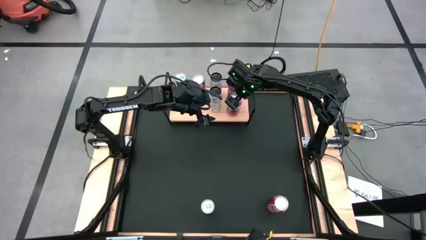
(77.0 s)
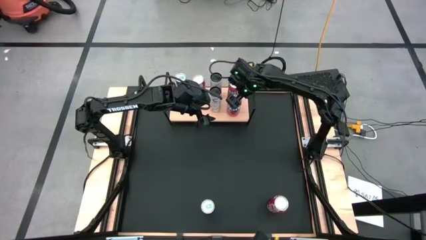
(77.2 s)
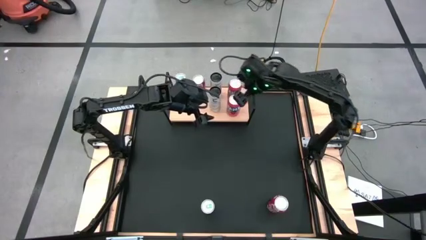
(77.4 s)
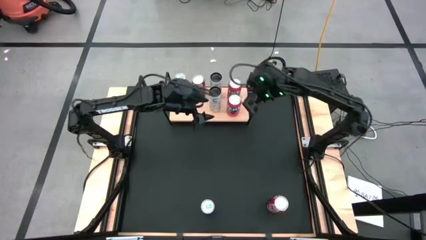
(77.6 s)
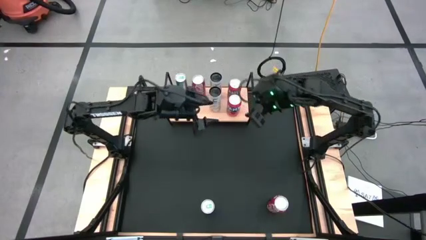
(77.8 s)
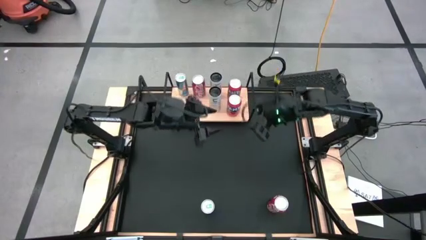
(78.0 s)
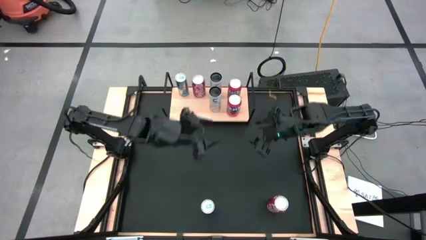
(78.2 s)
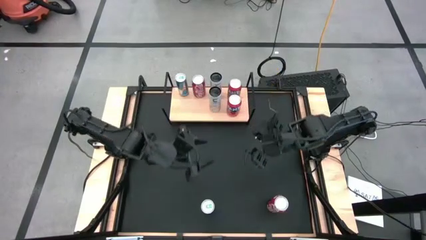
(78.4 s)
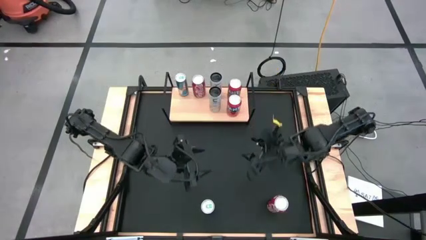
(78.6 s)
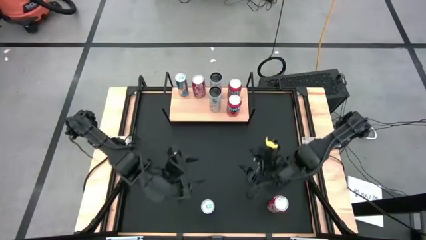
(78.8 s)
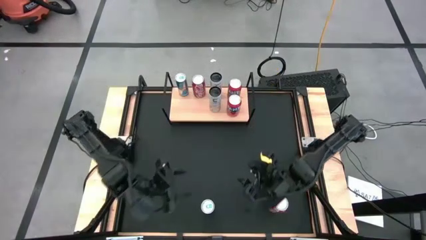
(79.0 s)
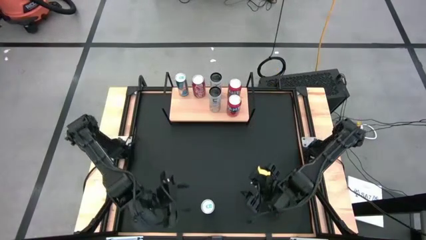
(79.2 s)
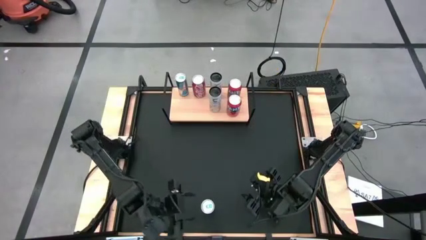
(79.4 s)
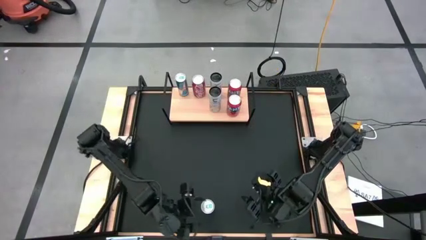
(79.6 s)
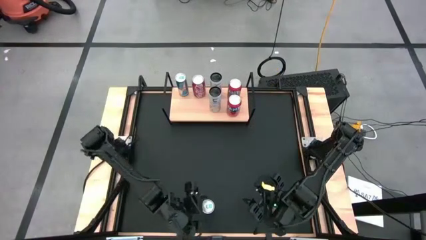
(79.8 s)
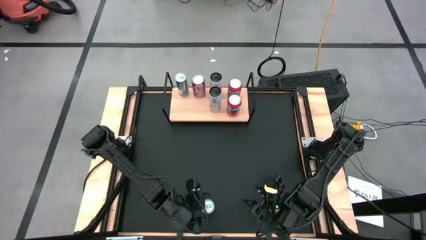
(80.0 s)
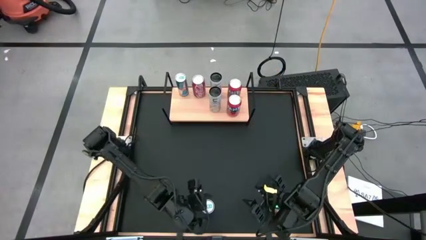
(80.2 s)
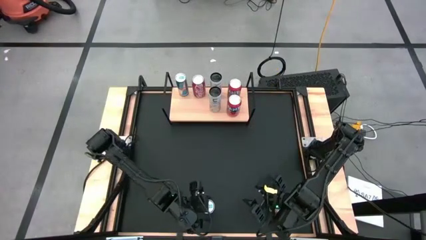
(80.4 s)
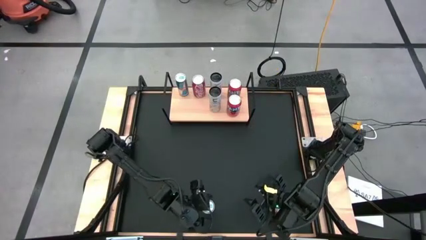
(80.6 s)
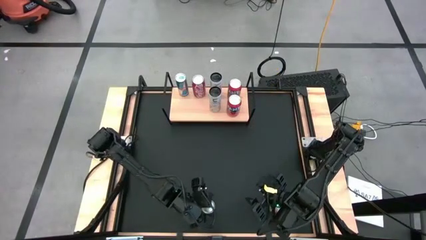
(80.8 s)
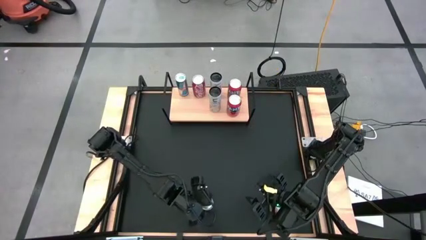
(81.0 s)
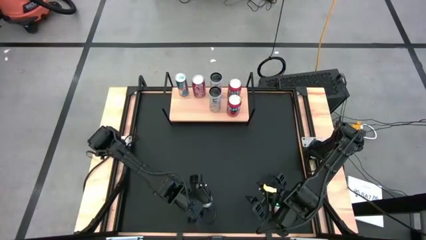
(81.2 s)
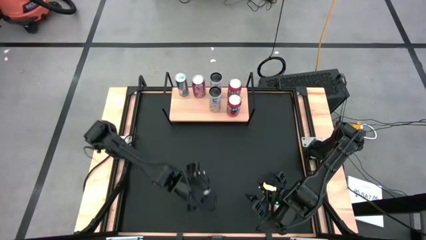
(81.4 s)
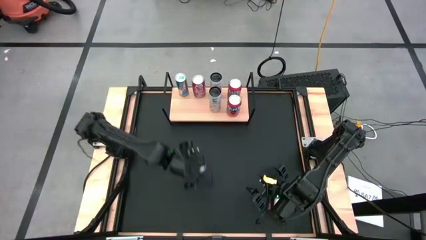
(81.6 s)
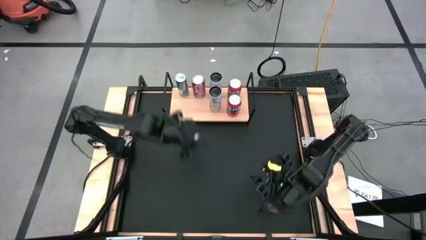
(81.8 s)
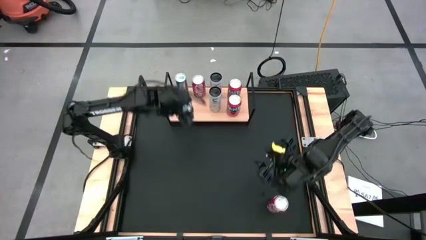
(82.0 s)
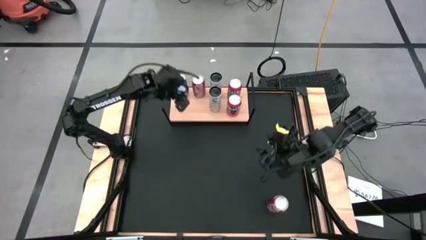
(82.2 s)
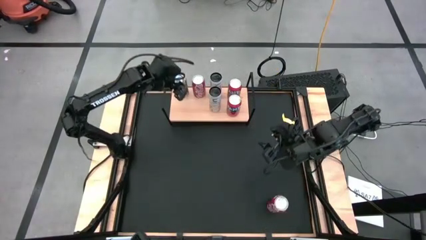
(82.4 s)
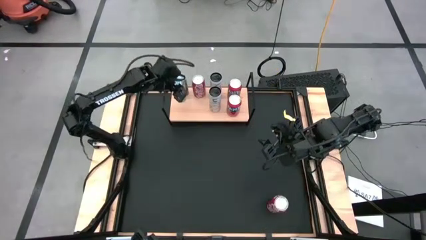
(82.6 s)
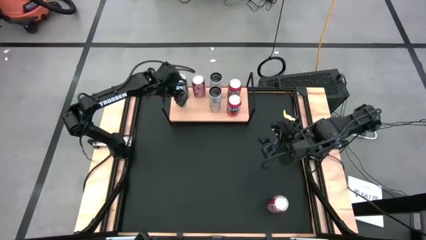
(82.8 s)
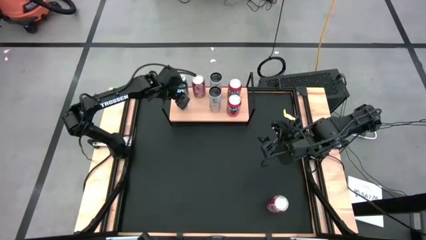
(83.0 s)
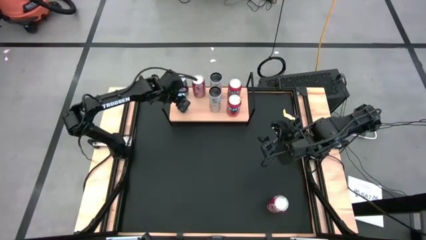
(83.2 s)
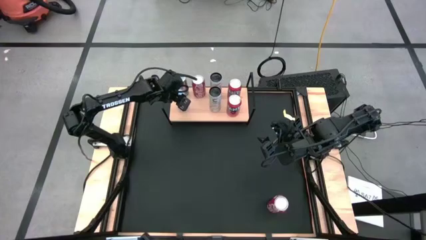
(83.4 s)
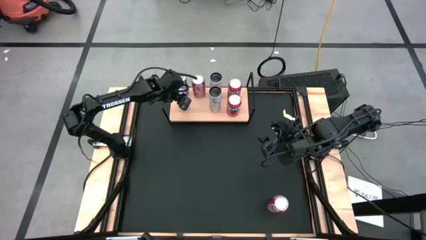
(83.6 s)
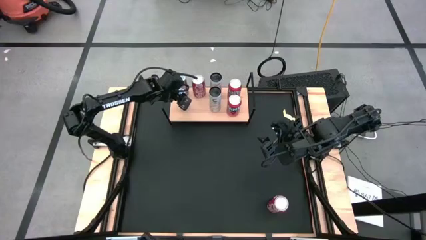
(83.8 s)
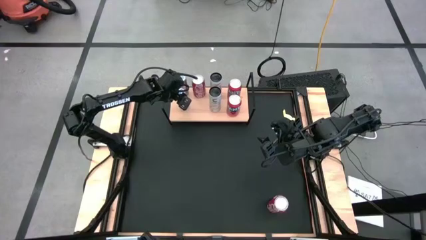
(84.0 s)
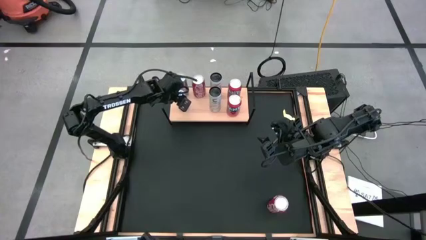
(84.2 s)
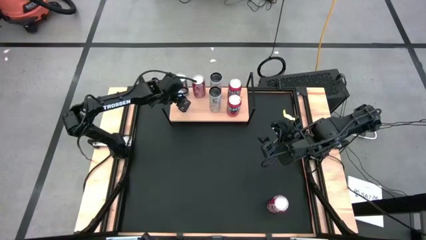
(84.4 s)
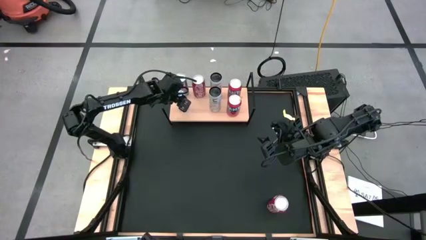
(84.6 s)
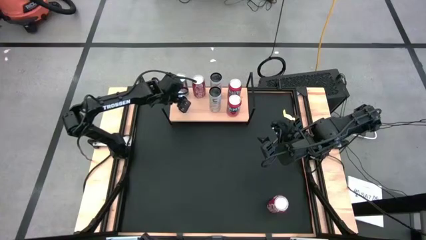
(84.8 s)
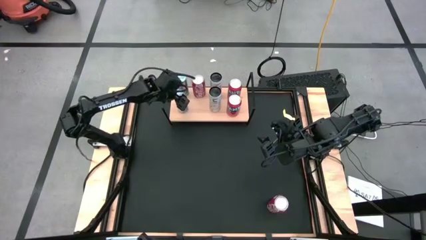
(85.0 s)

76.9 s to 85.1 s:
Task: Place canned beverage on shelf
Put the blue soda can aligned with the other blue soda can on the shelf

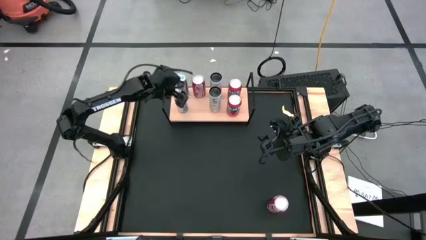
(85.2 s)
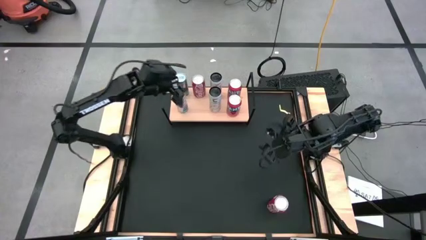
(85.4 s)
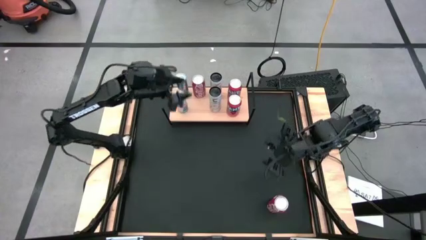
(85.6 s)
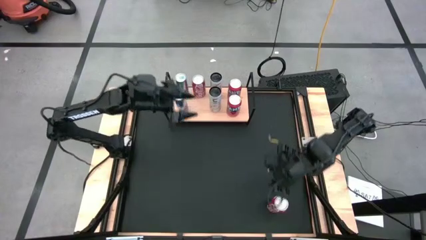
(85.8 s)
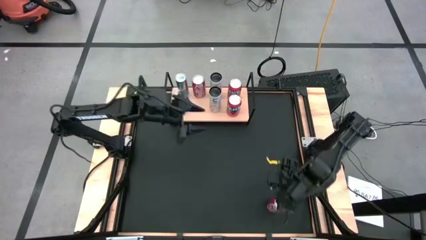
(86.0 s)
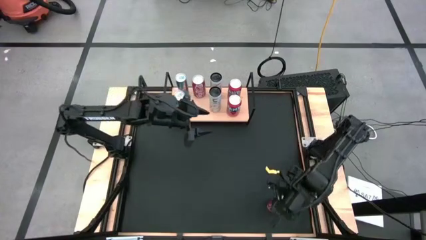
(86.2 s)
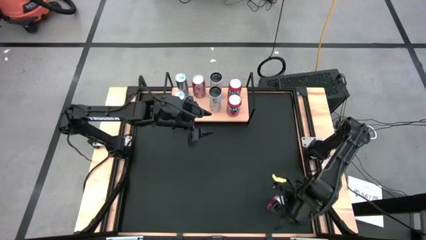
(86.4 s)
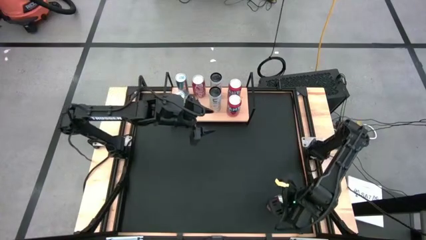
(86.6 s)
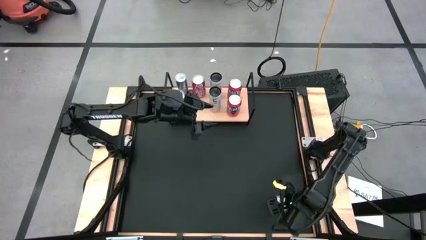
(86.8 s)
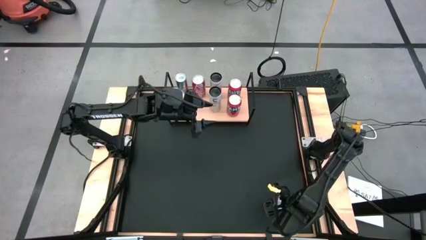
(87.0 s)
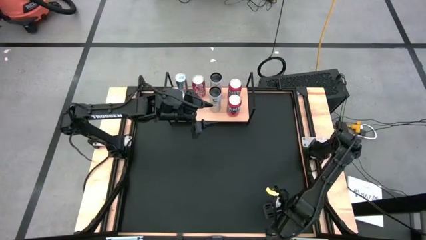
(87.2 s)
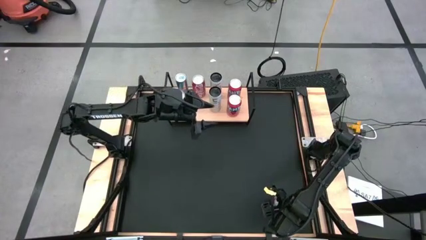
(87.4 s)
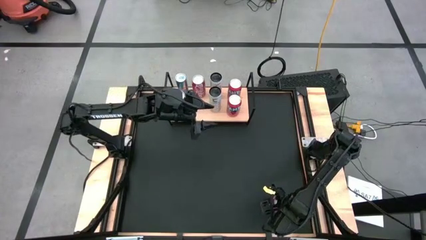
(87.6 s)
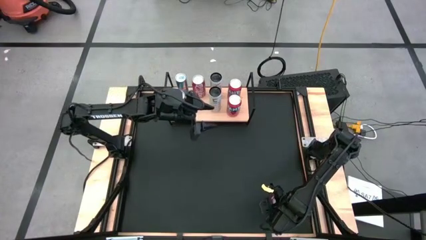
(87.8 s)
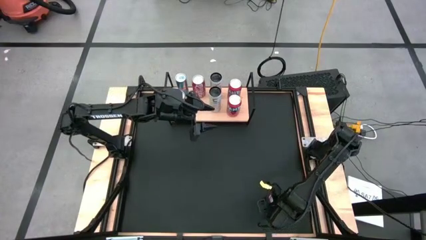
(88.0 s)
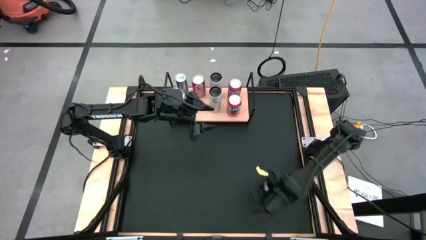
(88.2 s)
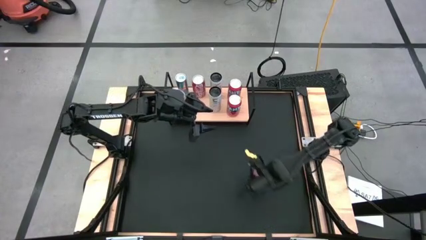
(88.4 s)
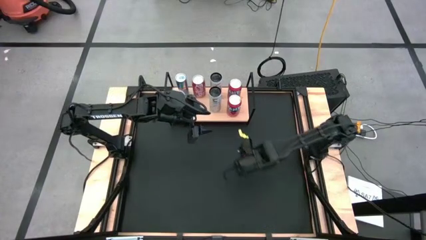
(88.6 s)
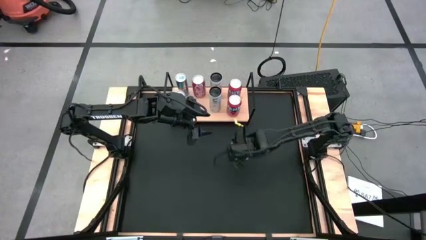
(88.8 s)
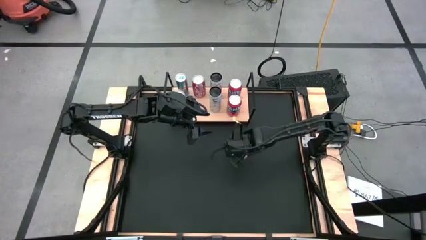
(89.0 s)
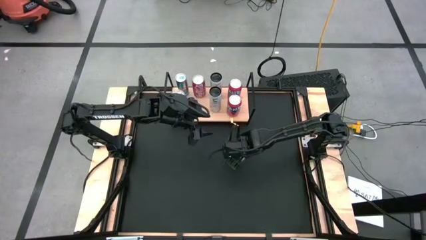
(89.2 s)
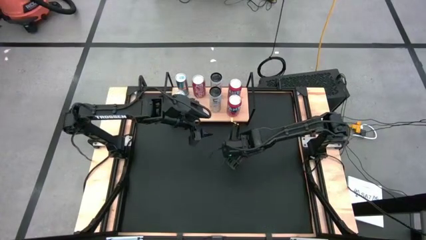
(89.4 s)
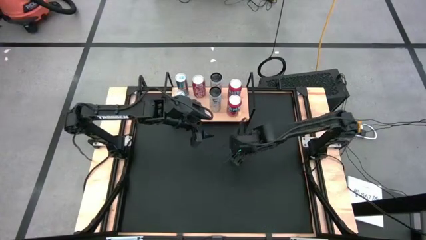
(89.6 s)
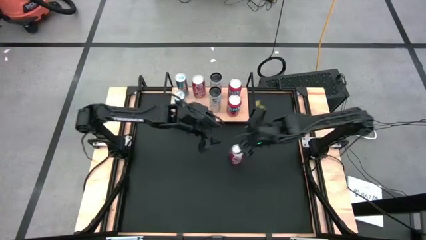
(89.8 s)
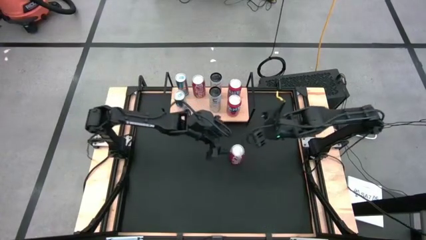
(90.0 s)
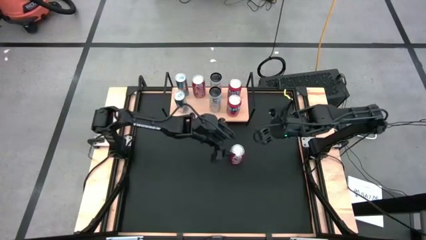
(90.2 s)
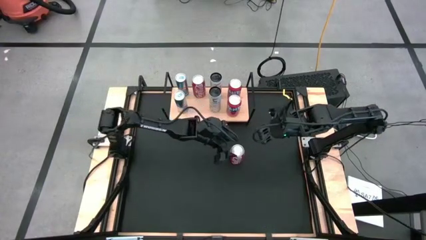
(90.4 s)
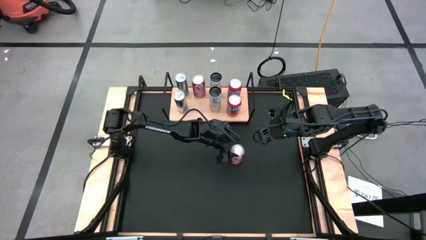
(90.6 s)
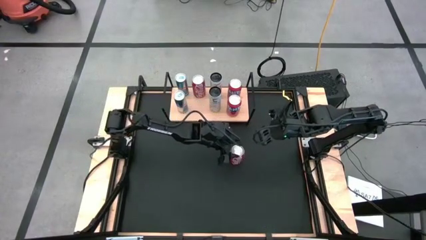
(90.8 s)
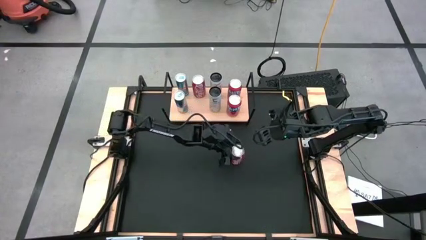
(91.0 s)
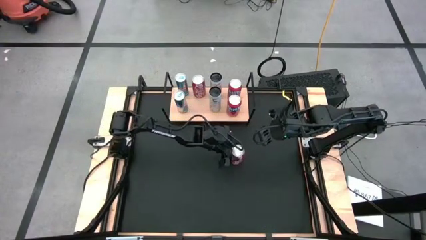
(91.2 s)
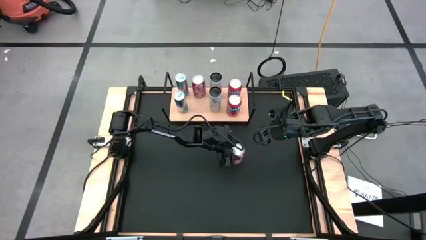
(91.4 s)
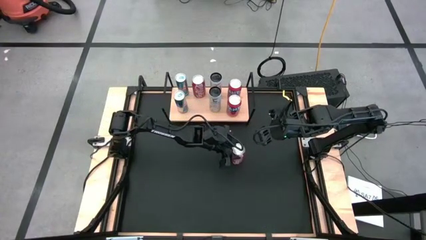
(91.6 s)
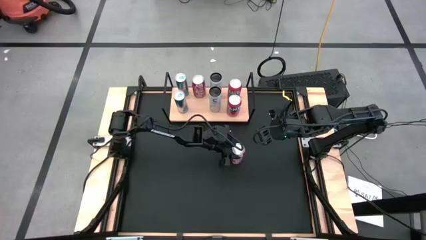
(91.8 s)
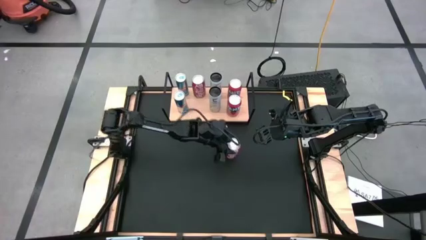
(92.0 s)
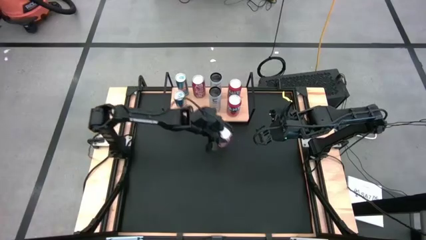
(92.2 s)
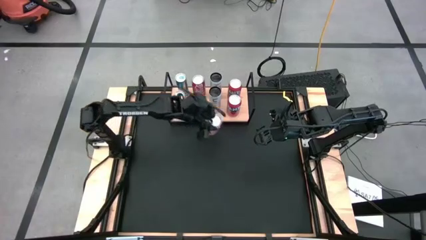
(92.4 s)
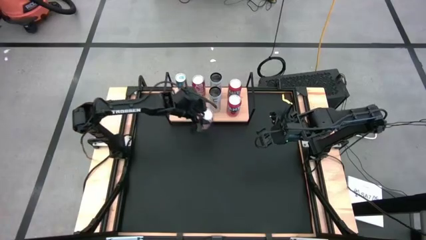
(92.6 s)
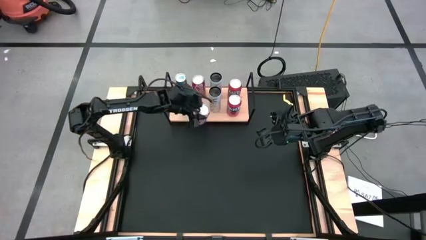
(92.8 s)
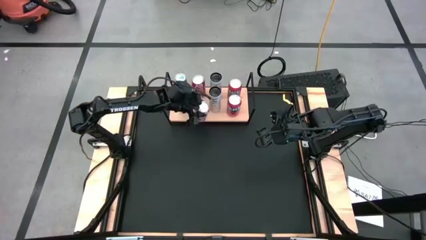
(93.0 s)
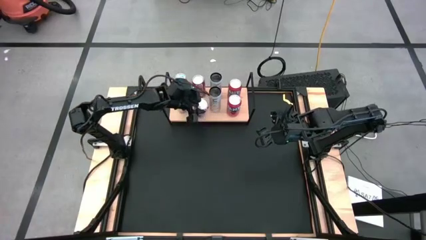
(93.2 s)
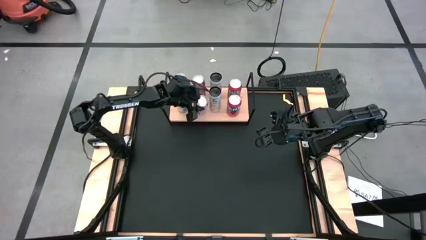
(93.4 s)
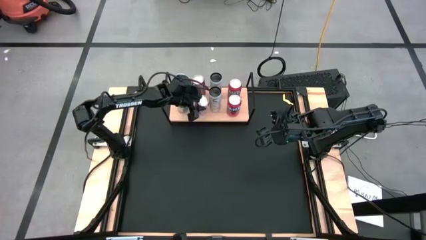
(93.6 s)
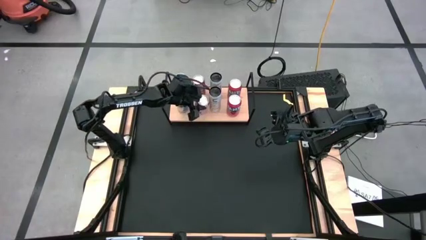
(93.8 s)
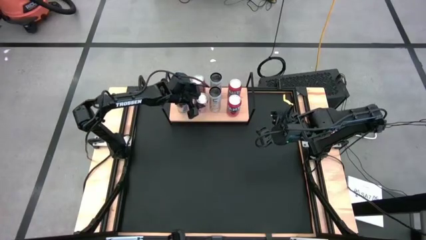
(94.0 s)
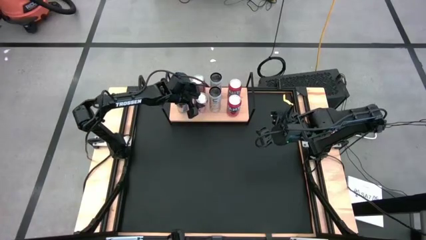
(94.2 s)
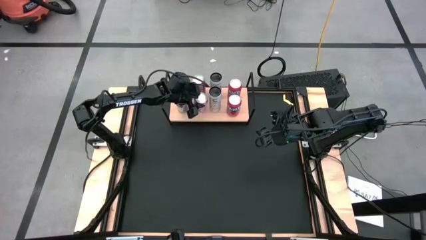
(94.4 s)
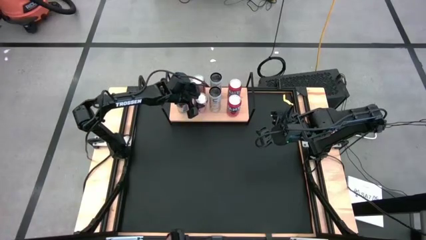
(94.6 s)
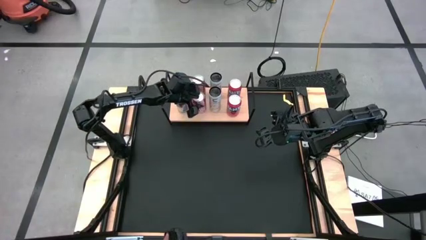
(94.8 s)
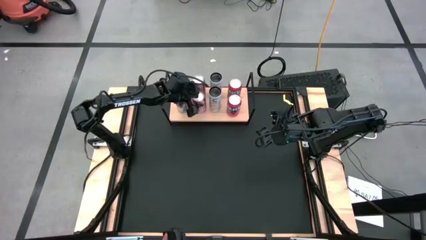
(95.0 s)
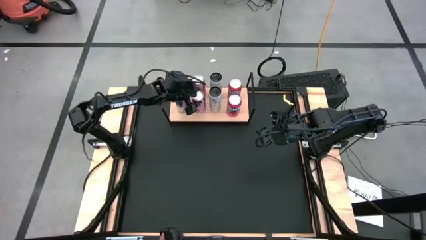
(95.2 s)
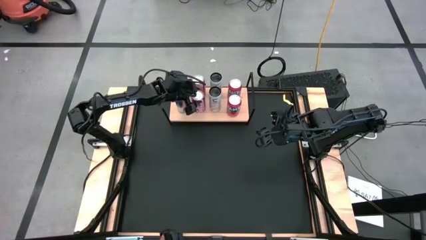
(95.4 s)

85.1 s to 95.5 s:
Put the red white can aligned with the other red white soda can on the shelf
